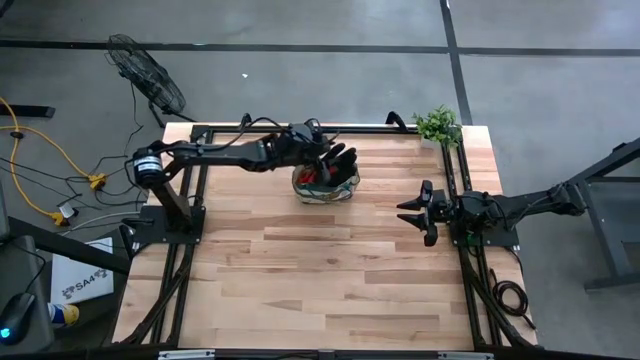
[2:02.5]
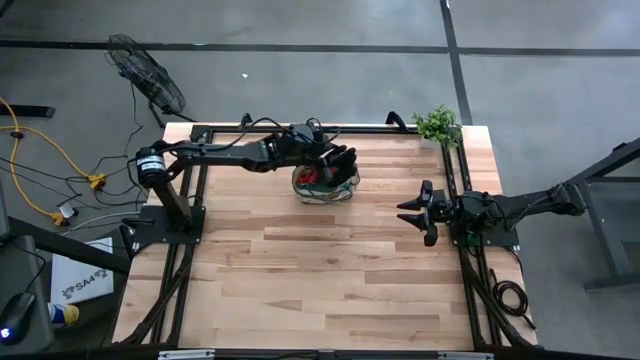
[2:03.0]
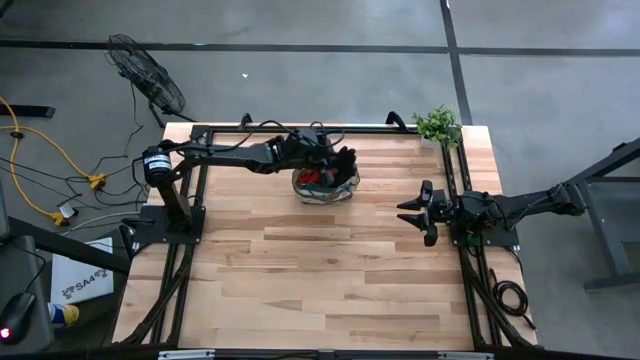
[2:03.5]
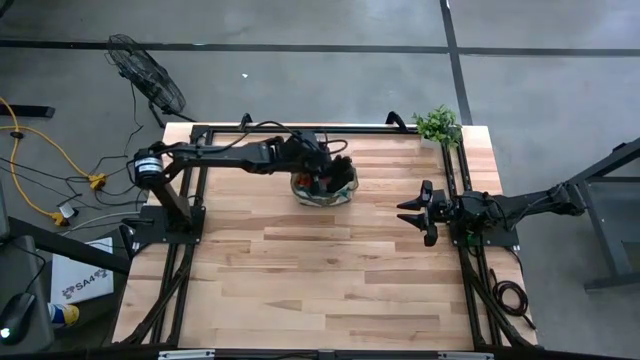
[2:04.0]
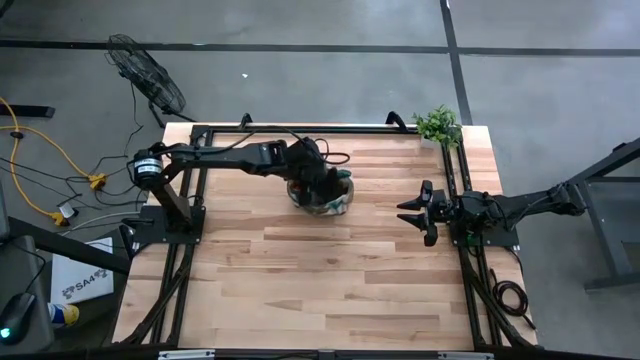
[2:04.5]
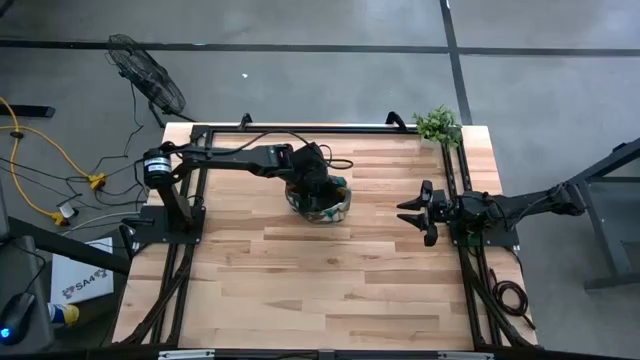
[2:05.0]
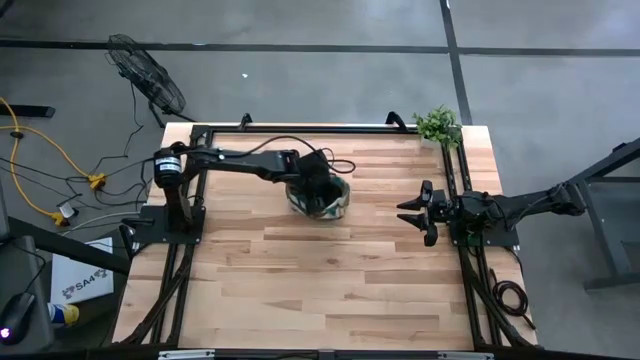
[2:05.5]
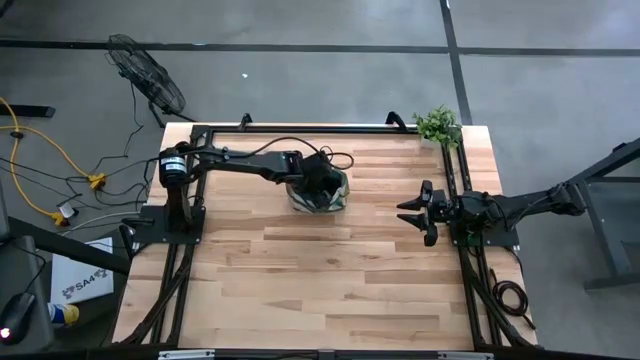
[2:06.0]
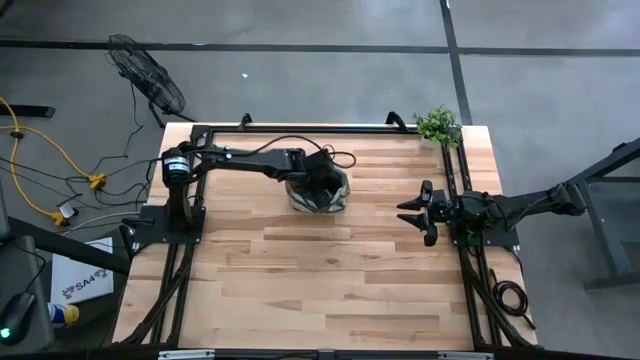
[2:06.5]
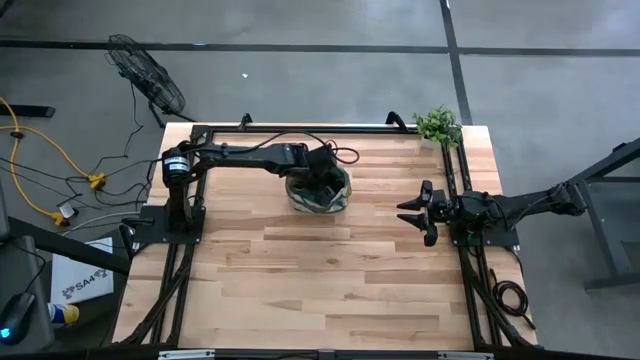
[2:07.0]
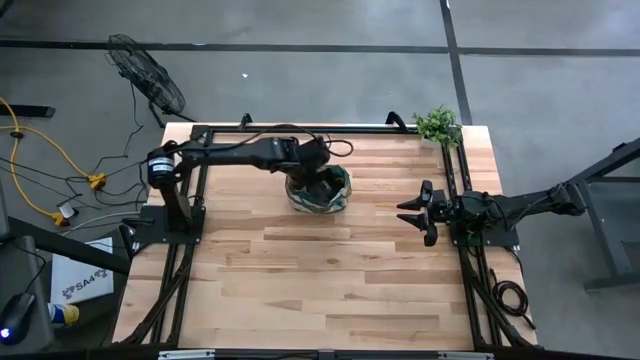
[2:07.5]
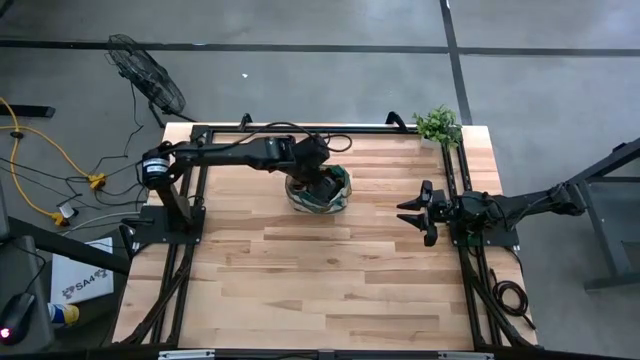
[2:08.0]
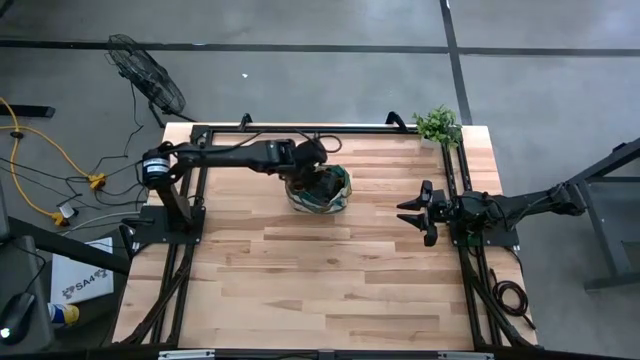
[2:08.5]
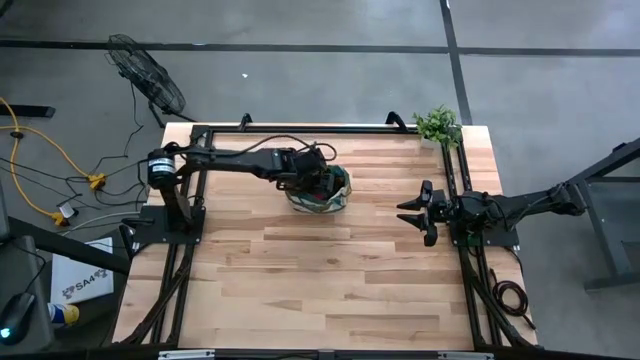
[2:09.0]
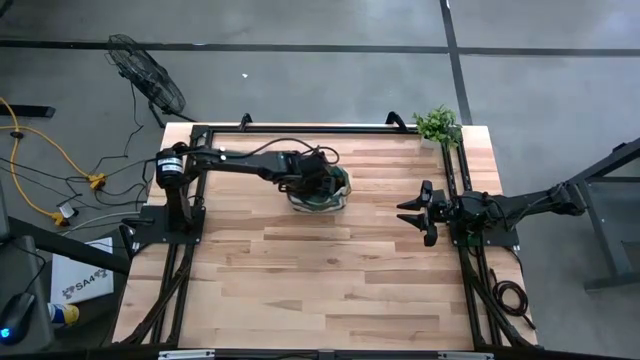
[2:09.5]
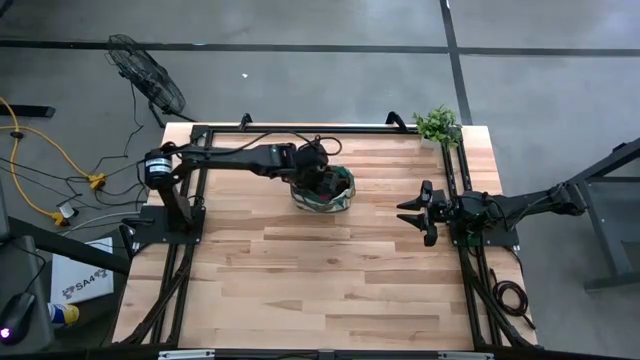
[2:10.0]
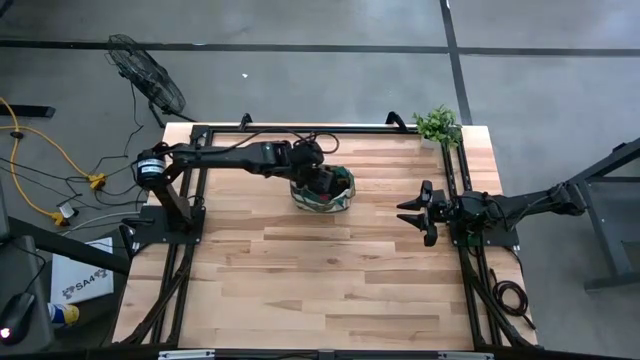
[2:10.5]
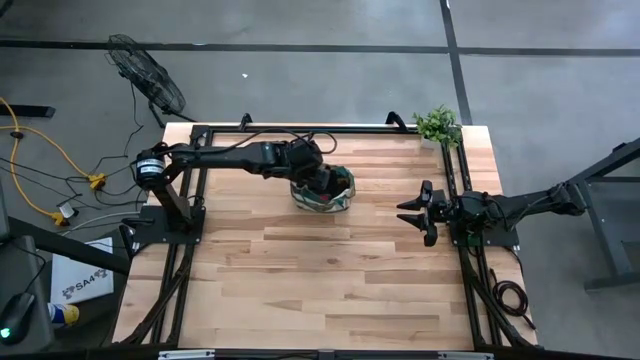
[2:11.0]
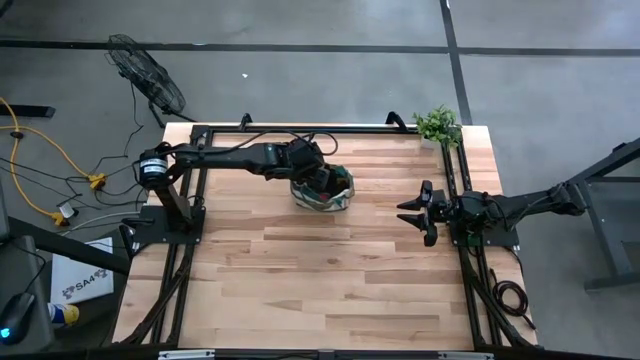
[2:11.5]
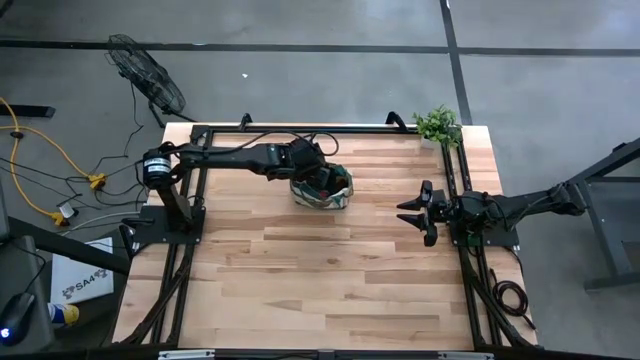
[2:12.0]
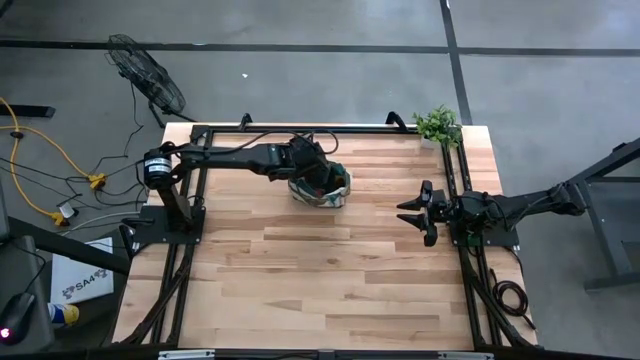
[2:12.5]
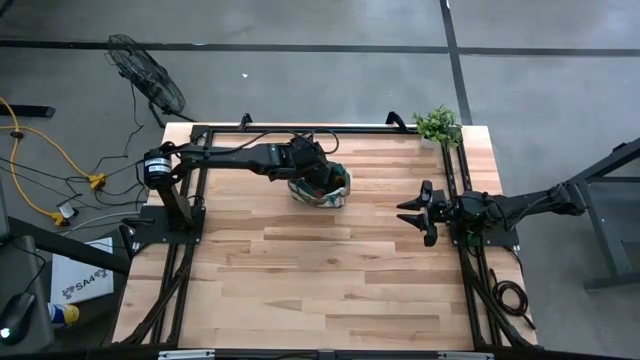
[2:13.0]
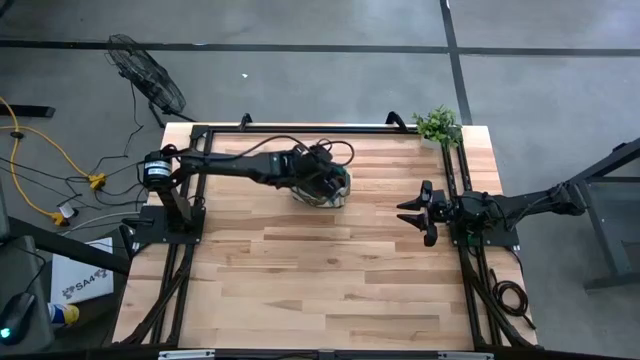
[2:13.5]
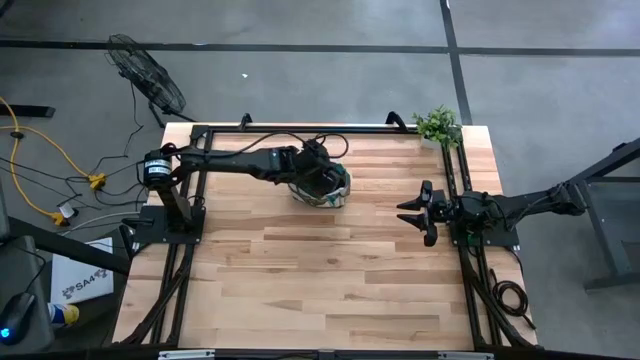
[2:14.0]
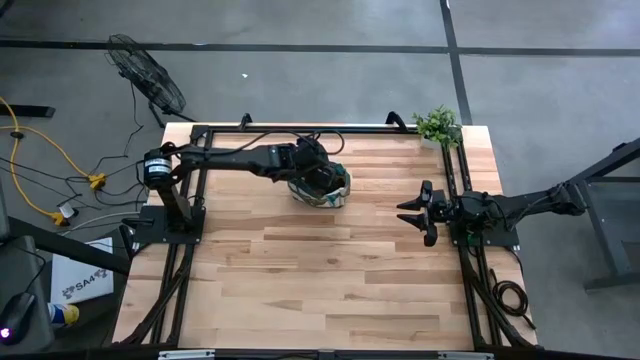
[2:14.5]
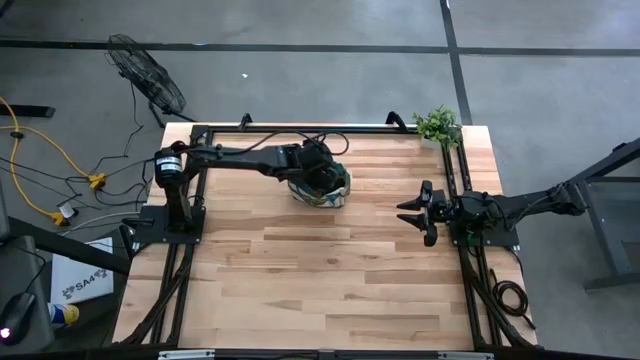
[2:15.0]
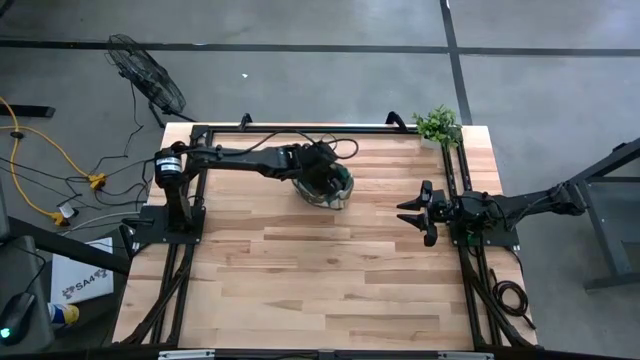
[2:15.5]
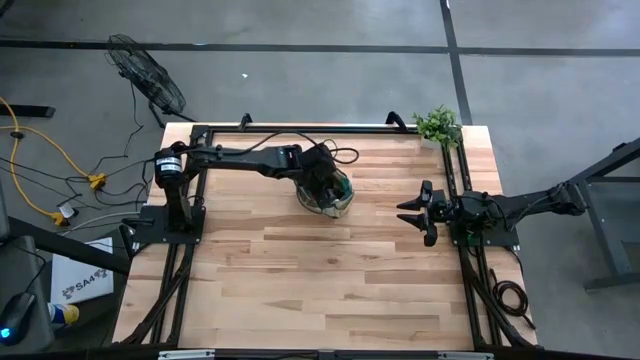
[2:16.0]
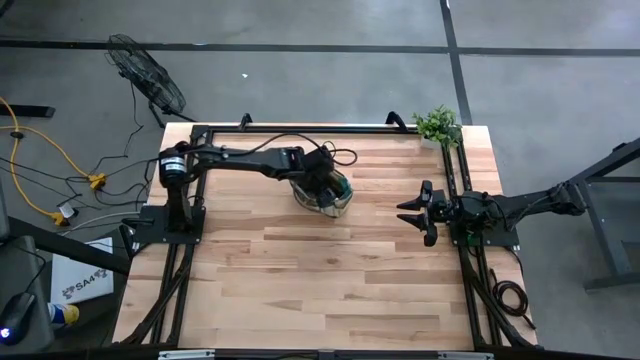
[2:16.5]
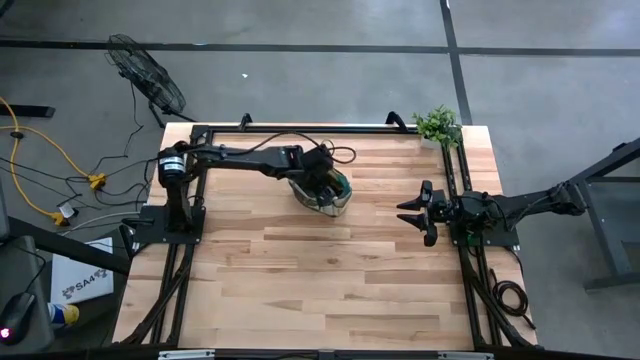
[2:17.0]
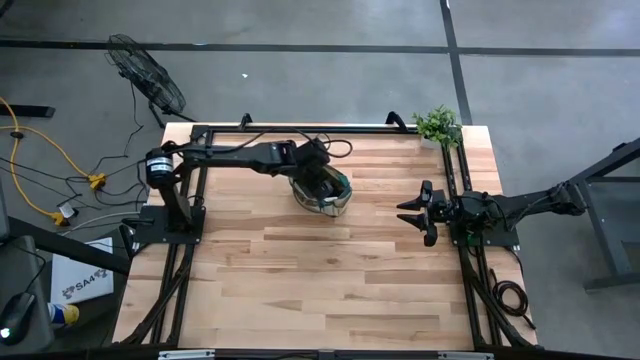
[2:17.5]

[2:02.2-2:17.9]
Task: Pick & Place Garden tools in Gardening bag
Put the red glove into the gardening bag

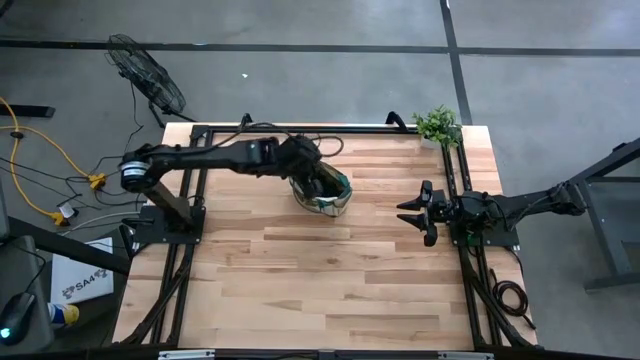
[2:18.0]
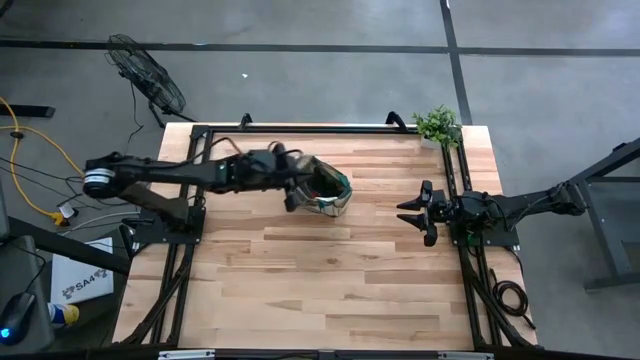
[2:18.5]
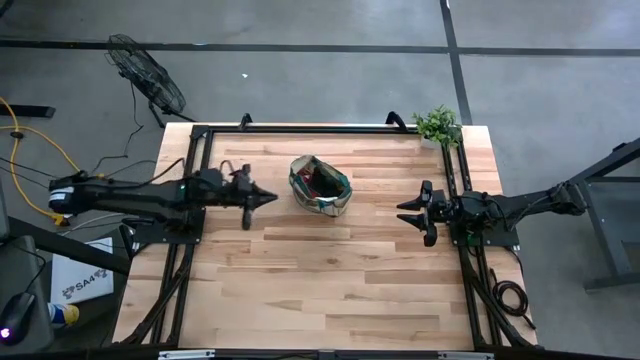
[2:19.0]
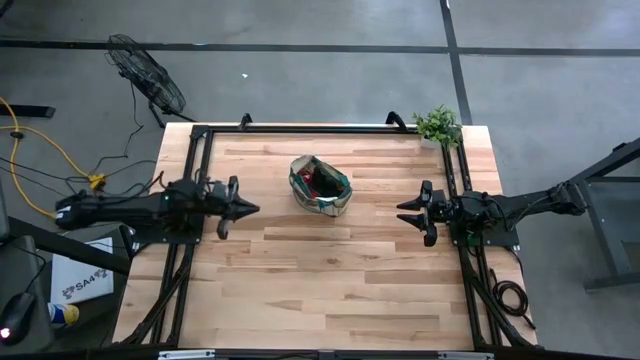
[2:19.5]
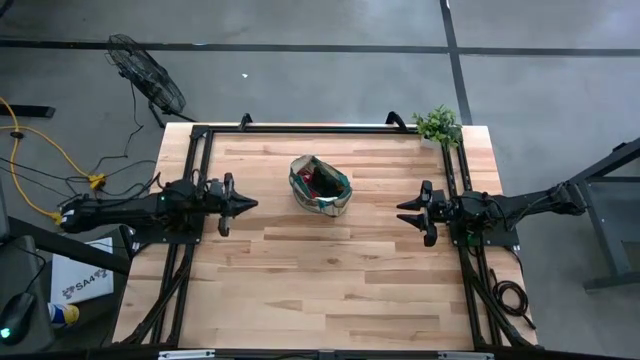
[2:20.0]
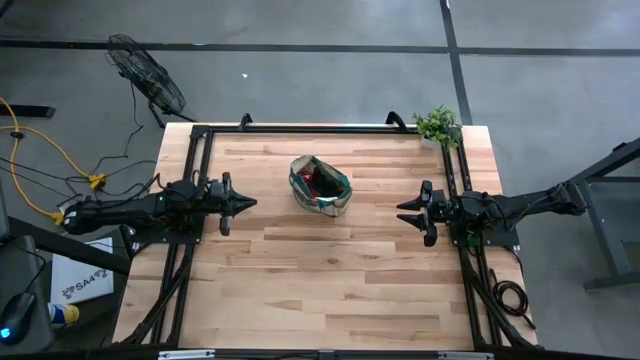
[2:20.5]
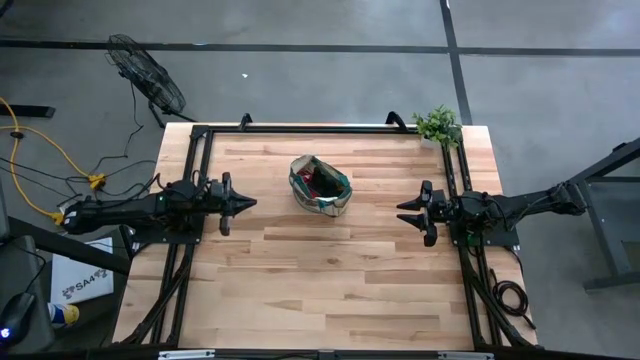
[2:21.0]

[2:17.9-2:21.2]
Return to Home Position

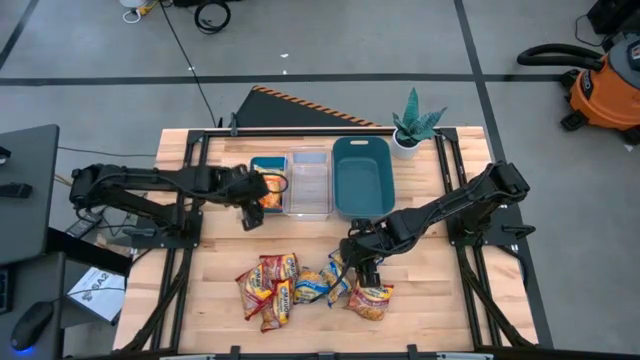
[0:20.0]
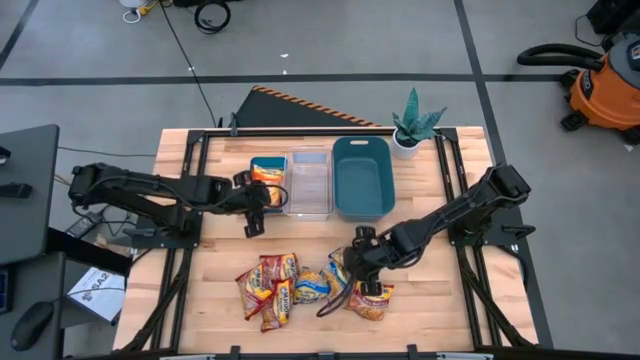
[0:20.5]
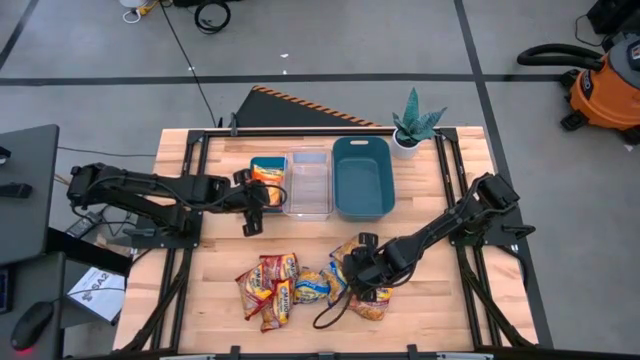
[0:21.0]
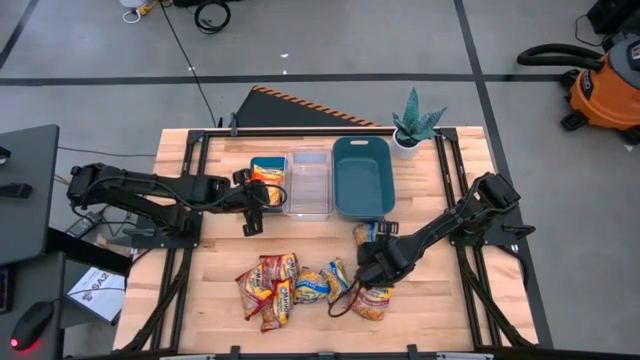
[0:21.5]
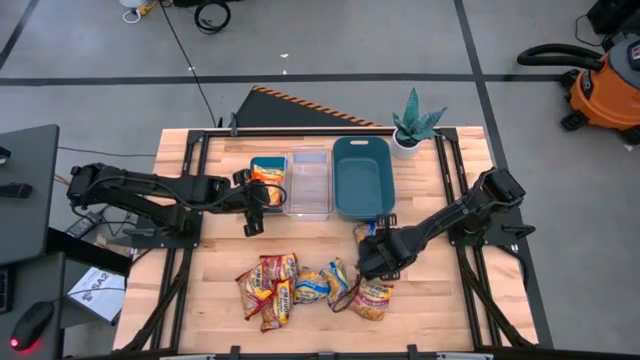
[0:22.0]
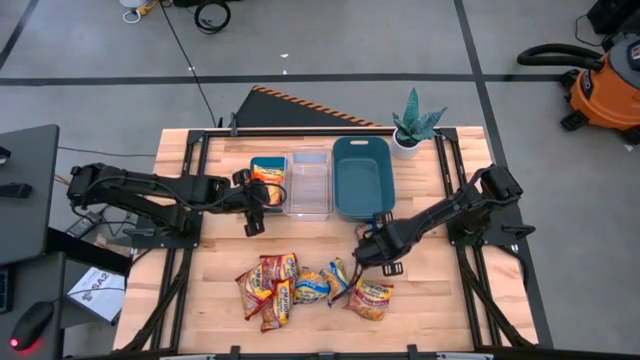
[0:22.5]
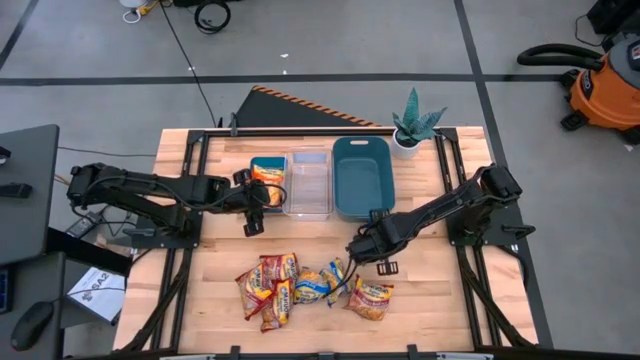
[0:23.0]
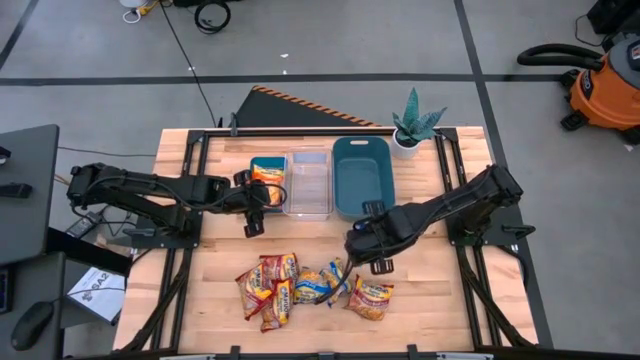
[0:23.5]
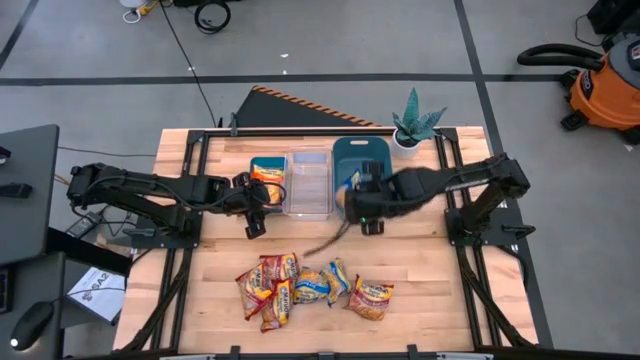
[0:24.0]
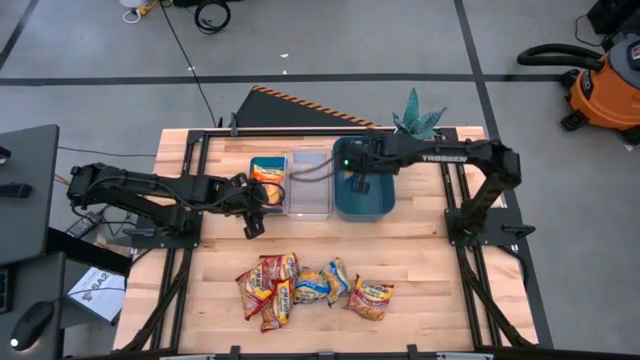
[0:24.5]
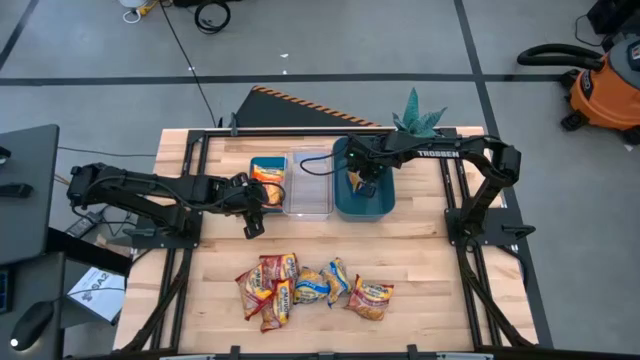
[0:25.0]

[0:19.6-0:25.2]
Task: Sort Maruchan noodles
Put the blue noodle pack into the dark blue bin
